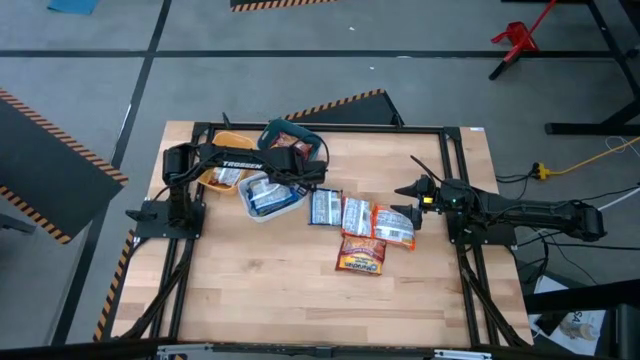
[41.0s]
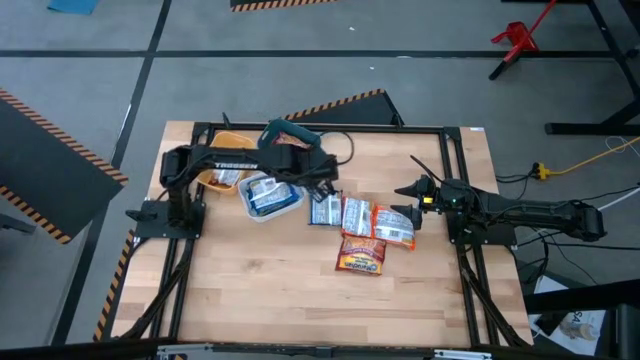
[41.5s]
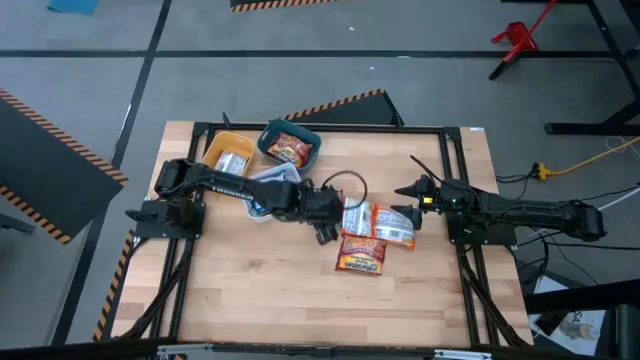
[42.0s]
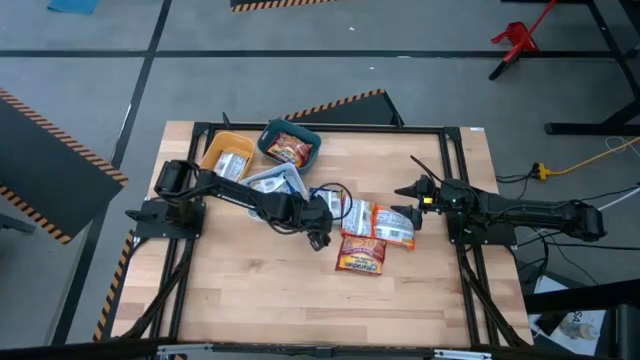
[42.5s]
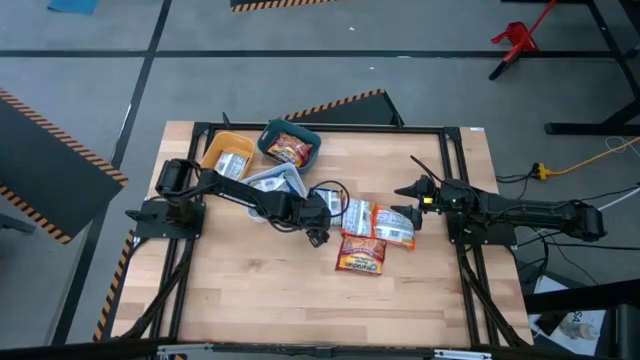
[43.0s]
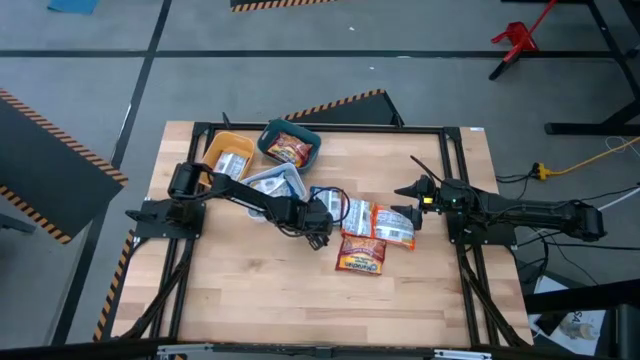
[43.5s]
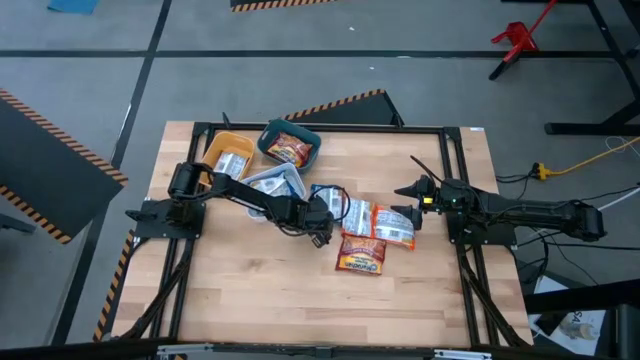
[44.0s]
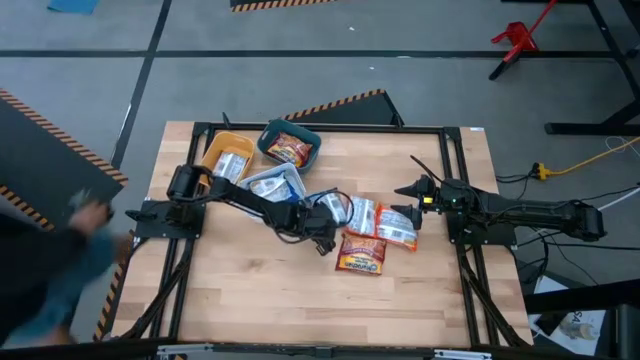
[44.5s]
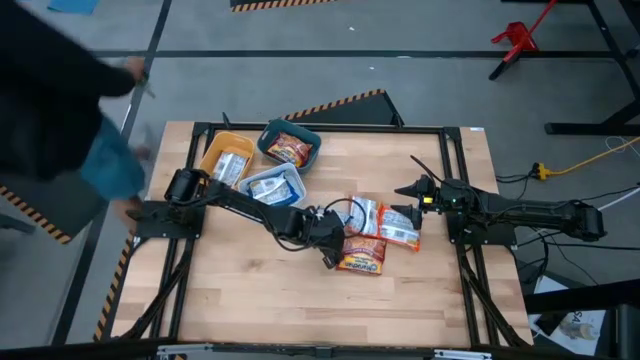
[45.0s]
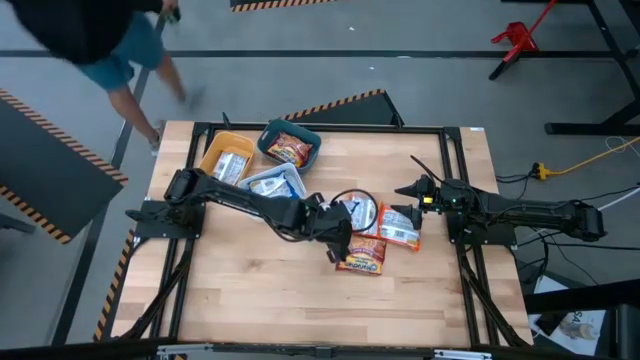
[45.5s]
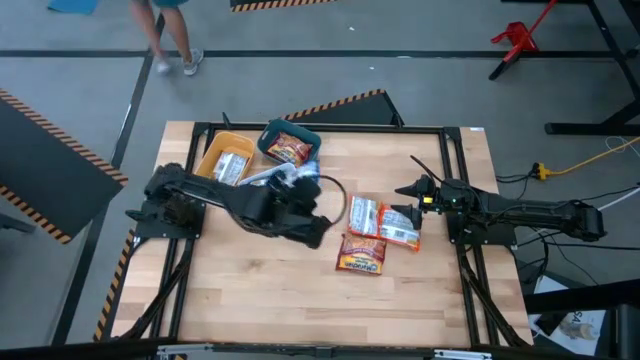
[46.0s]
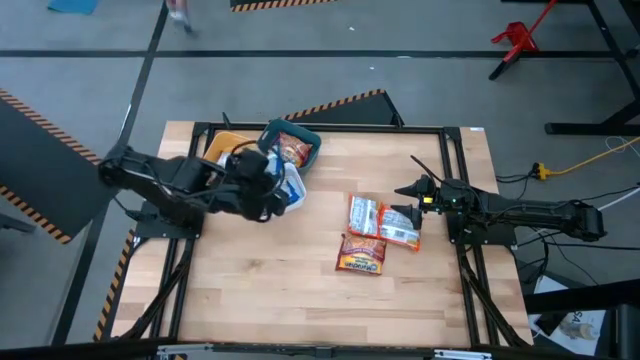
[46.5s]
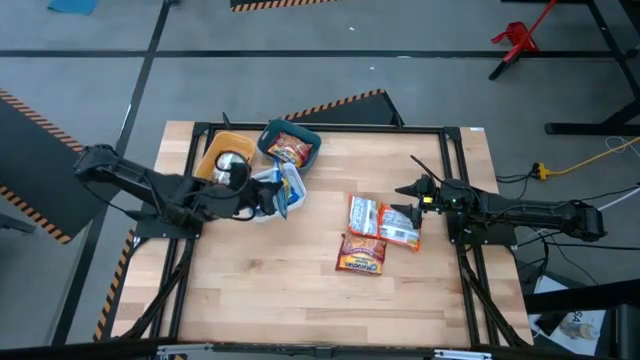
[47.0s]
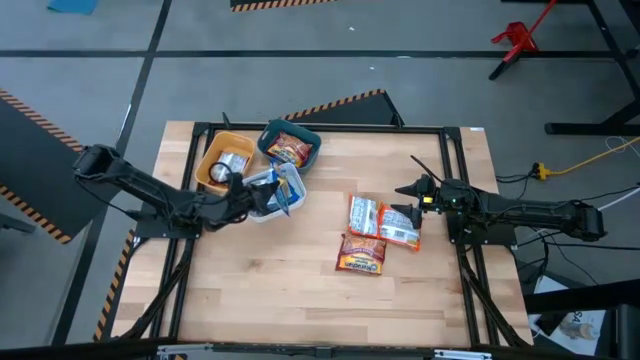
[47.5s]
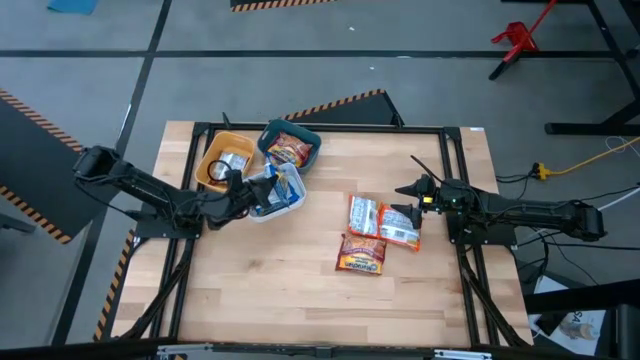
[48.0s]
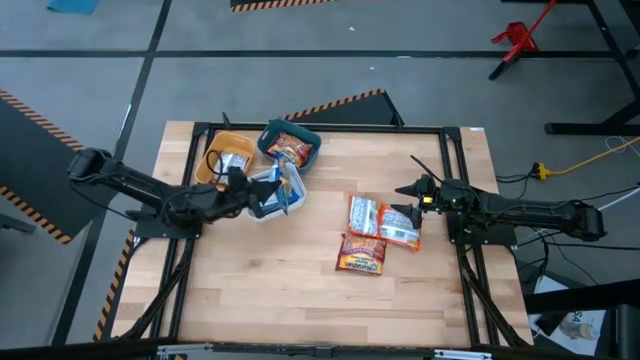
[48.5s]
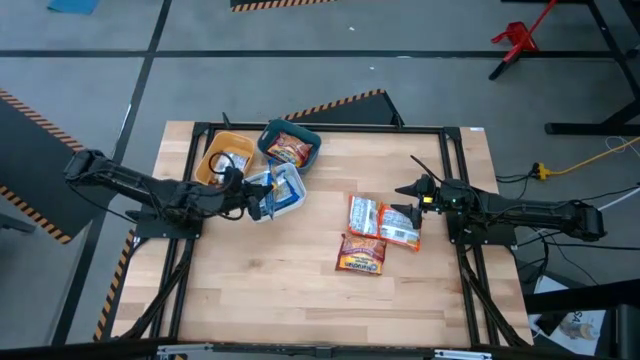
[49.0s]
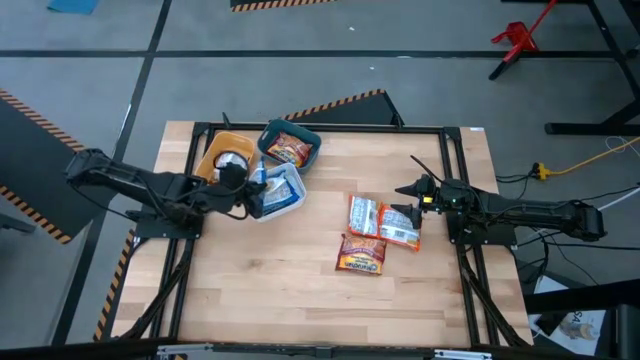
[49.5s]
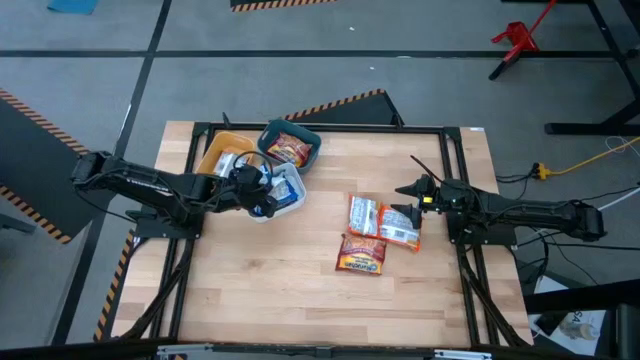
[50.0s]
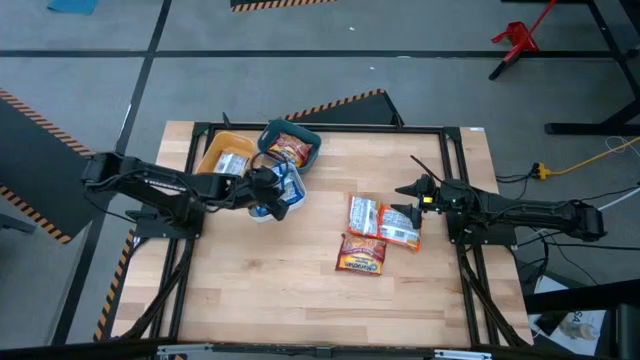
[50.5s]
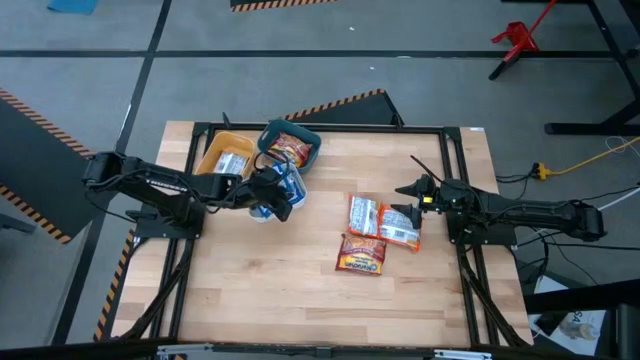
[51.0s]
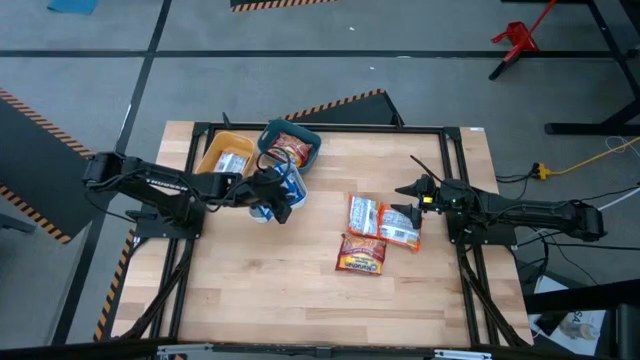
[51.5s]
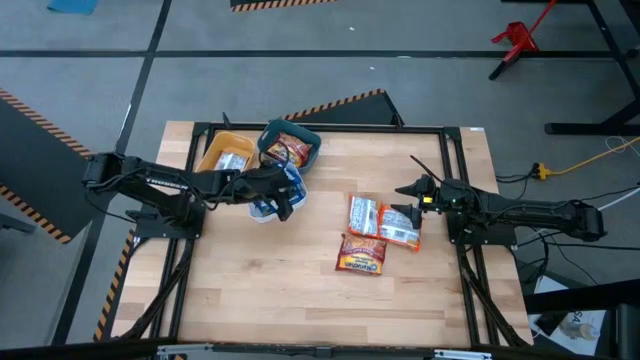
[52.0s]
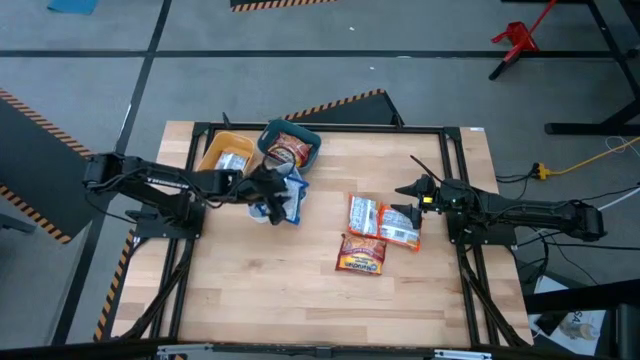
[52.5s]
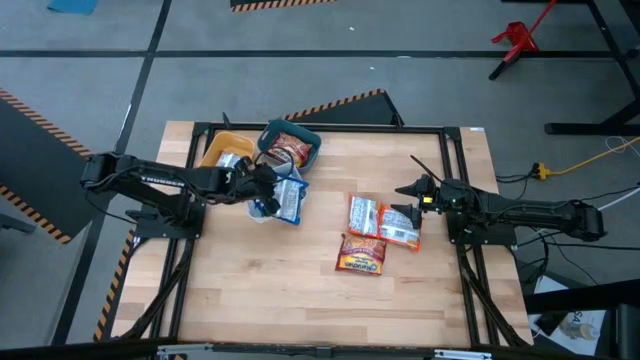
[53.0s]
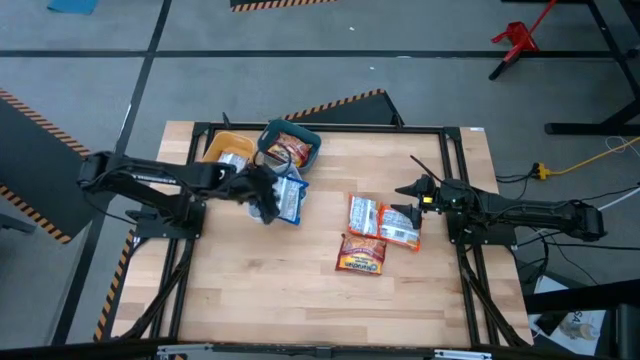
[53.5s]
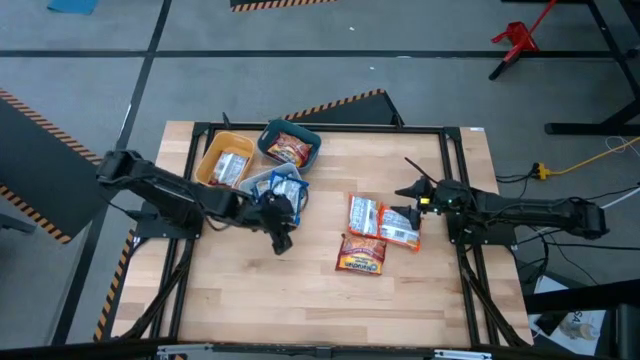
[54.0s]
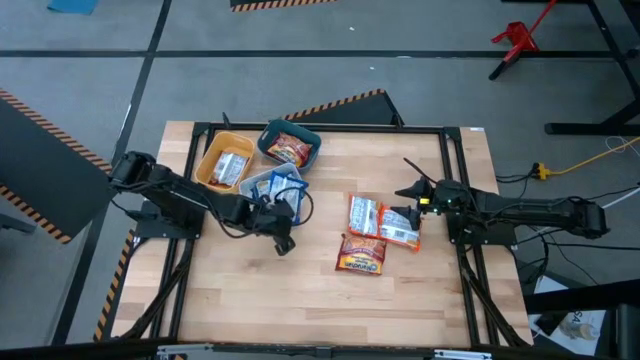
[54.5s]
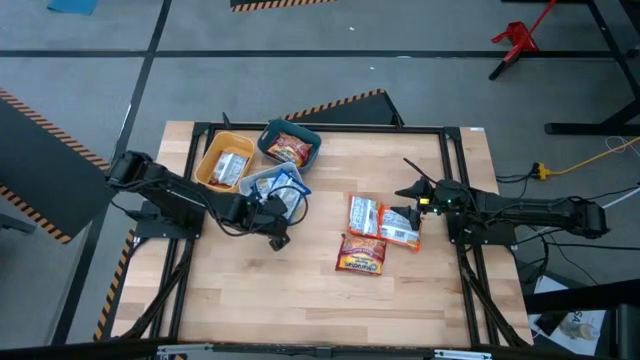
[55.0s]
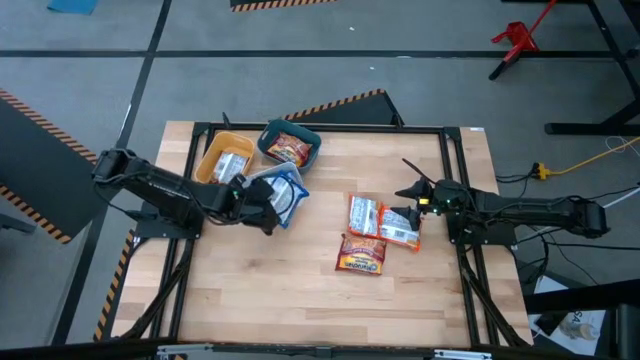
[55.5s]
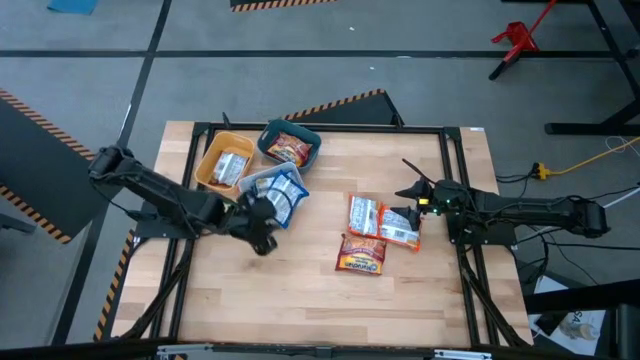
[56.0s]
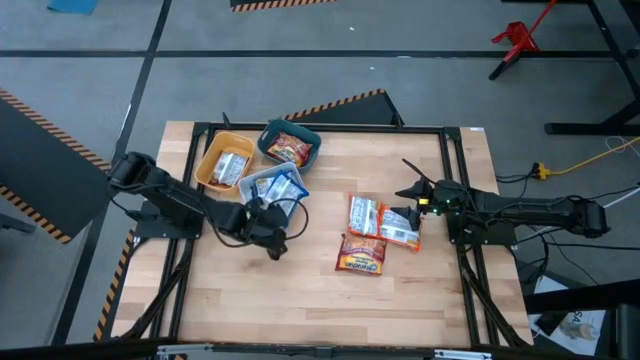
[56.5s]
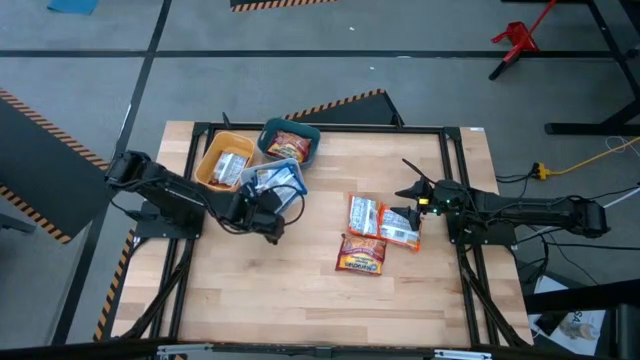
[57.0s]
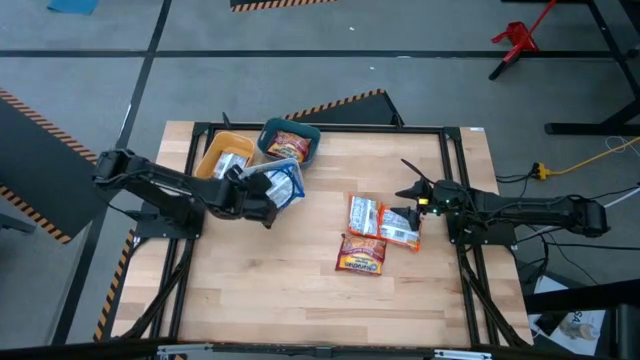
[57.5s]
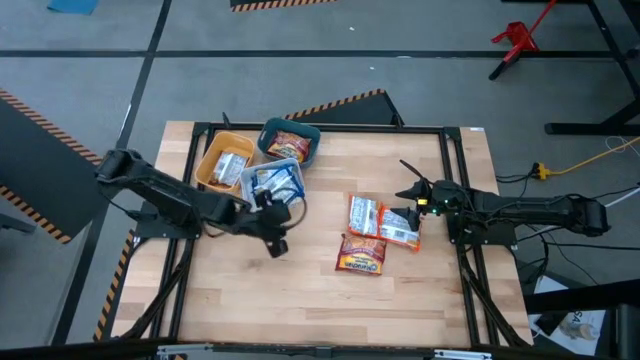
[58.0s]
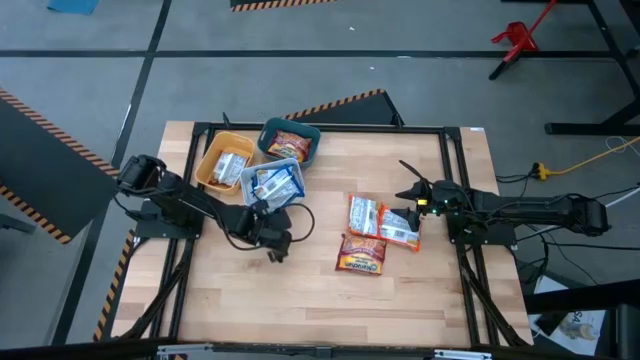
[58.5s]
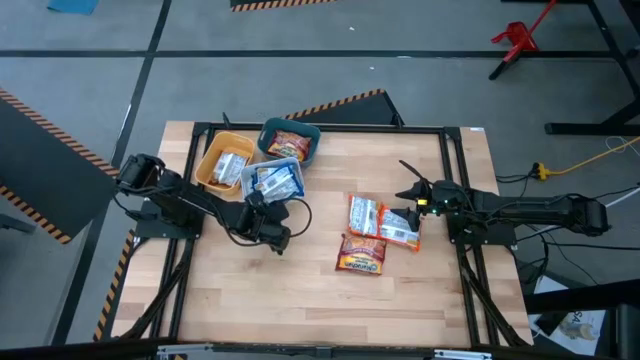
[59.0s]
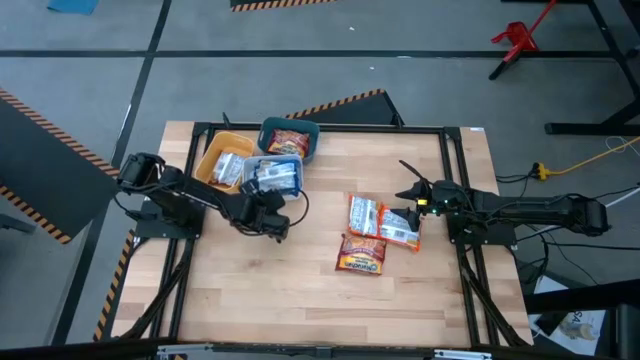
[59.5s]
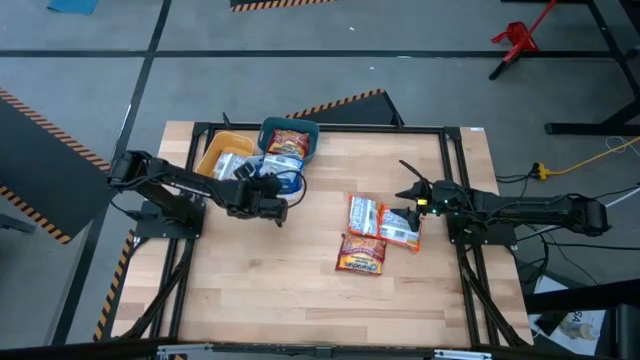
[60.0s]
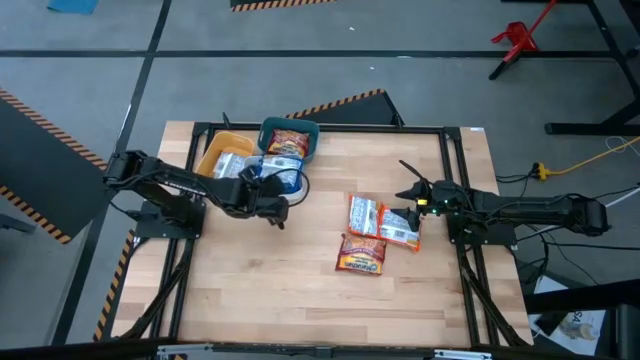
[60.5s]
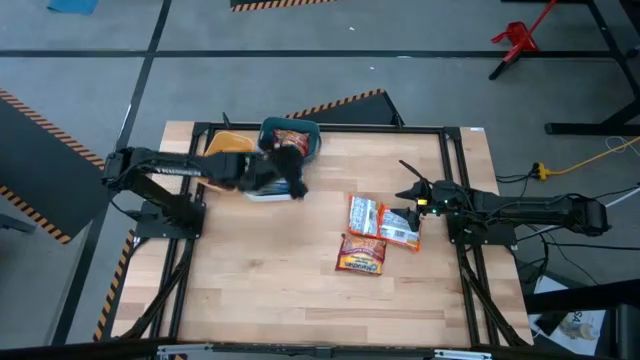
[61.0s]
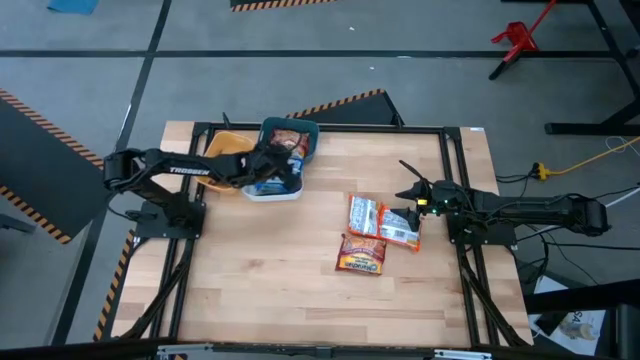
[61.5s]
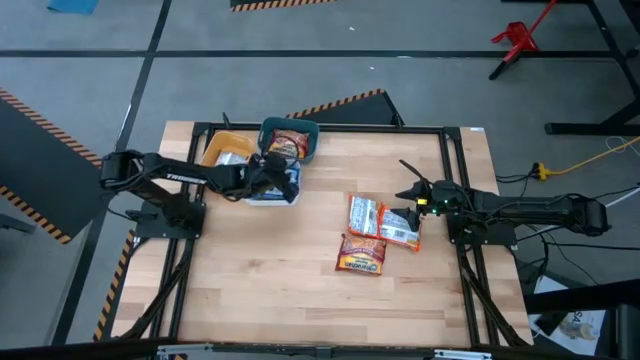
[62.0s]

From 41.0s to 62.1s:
Task: Sort Maruchan noodles
Put the blue noodle into the white bin

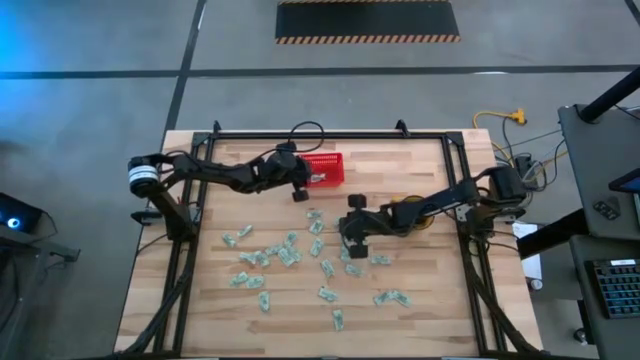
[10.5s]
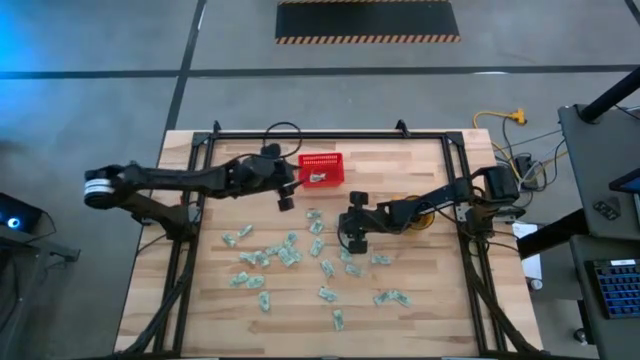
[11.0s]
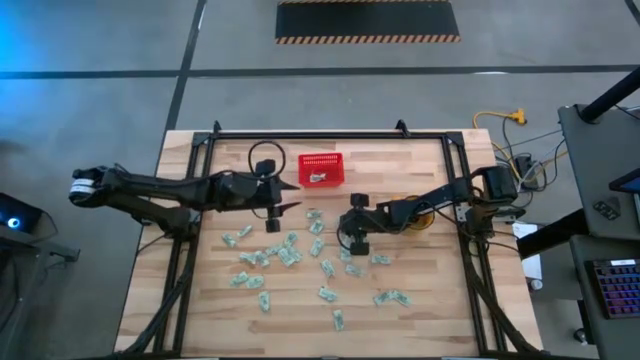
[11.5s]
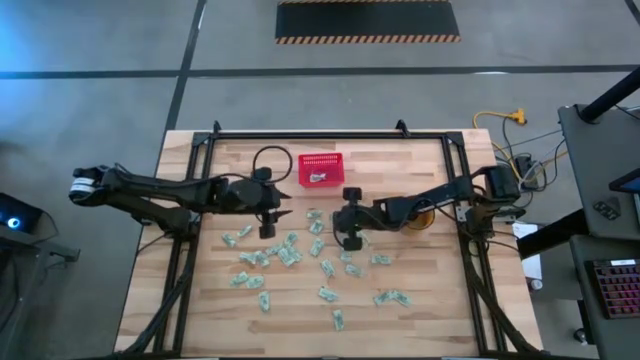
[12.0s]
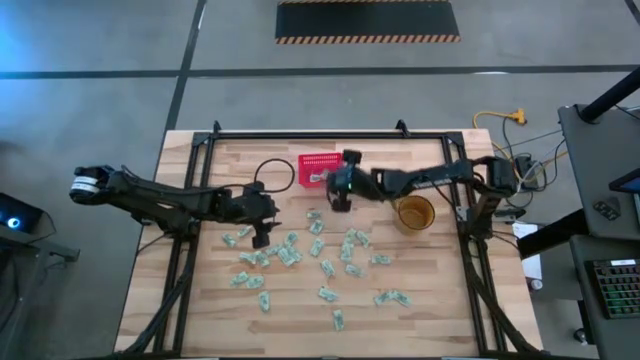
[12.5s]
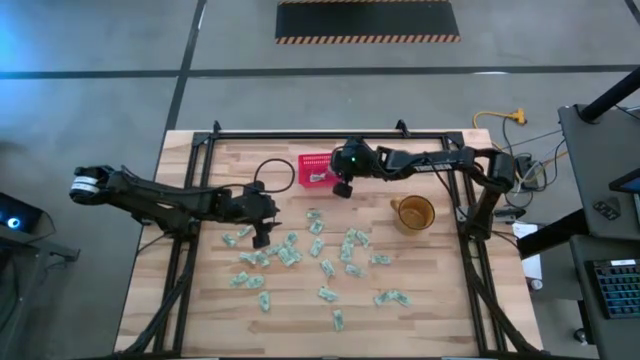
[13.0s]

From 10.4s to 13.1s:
Task: Pick and place Stevia / Truvia into bins
Put the white stevia packet into the red bin
